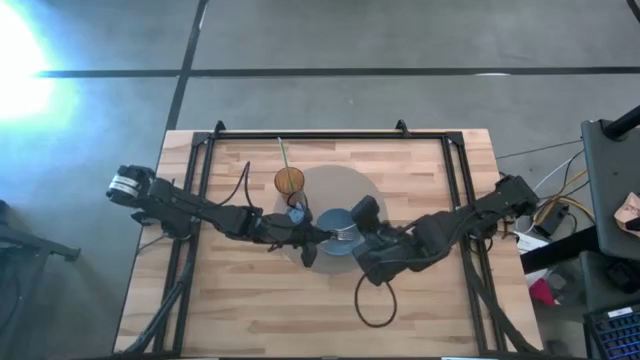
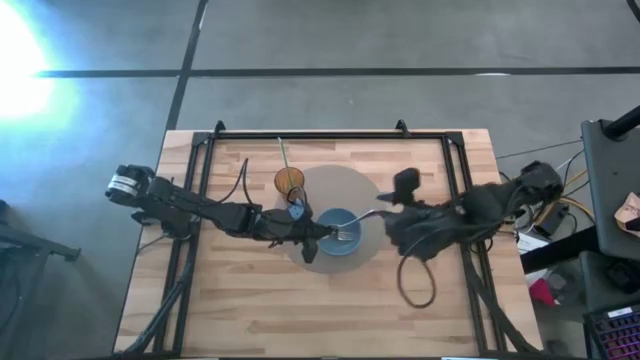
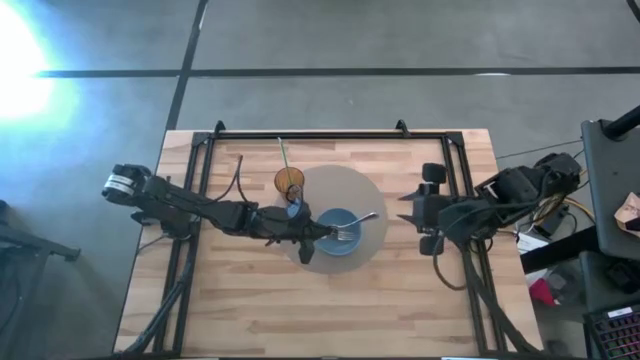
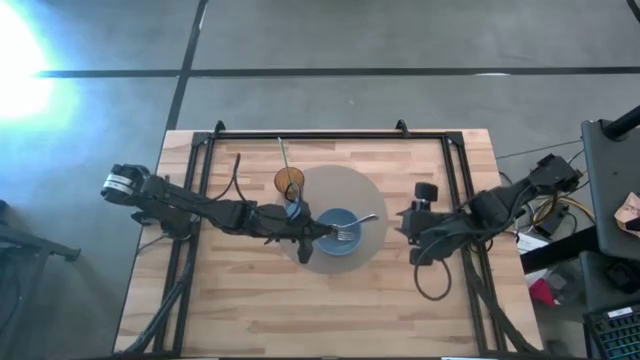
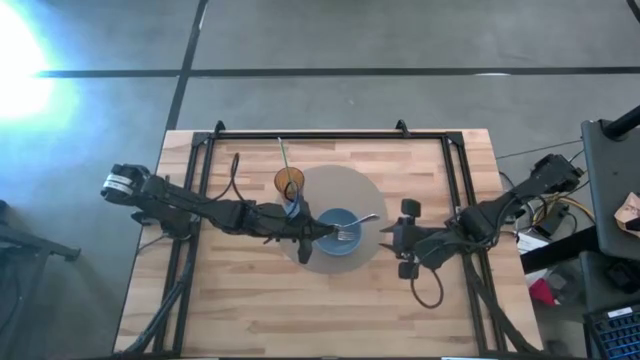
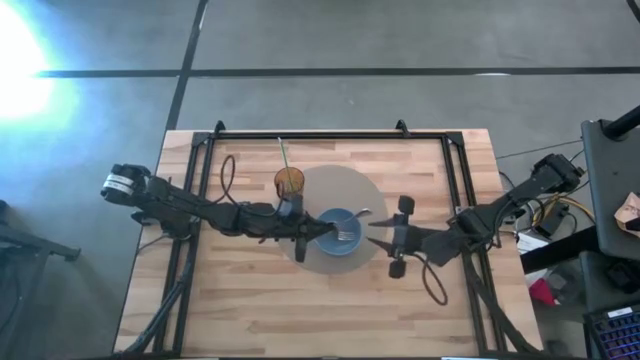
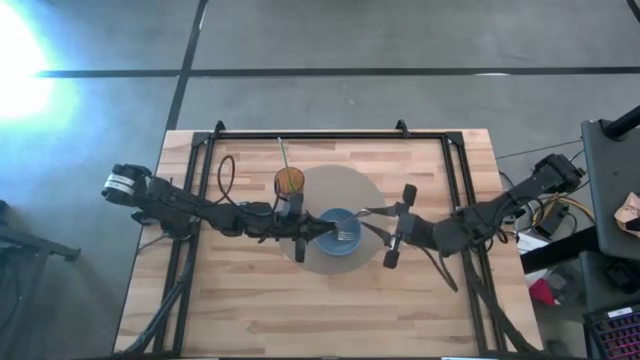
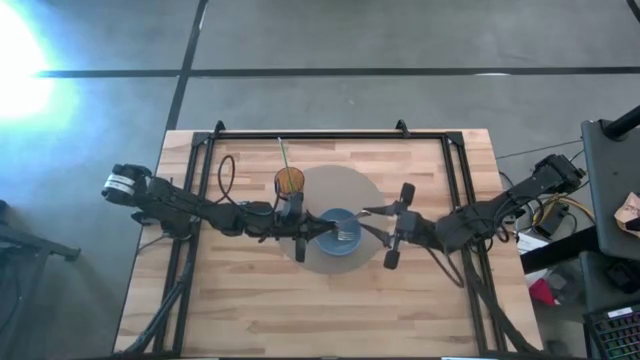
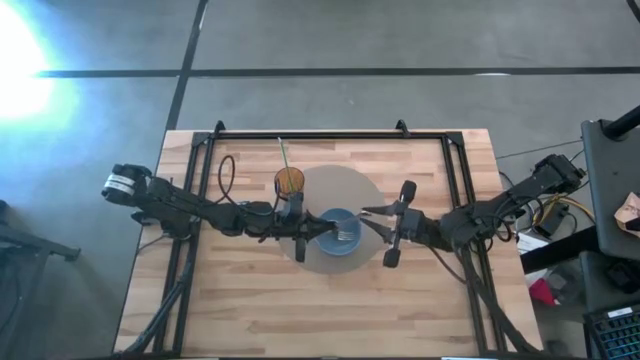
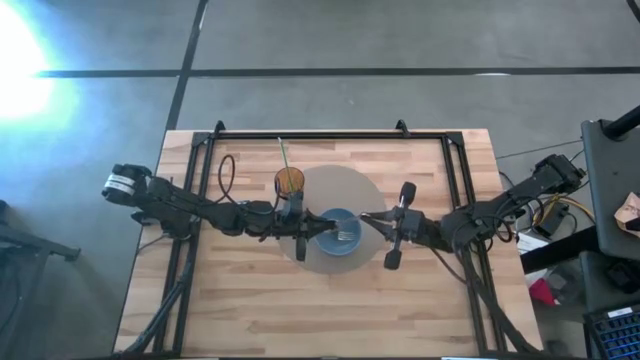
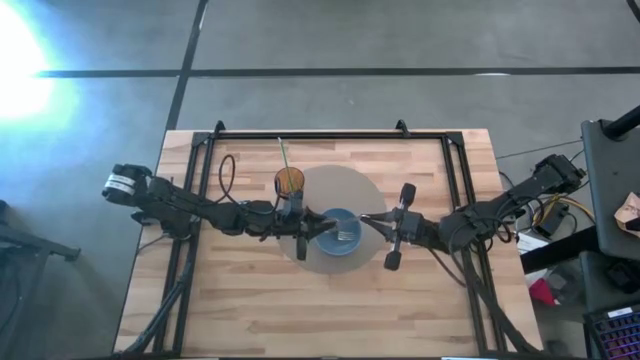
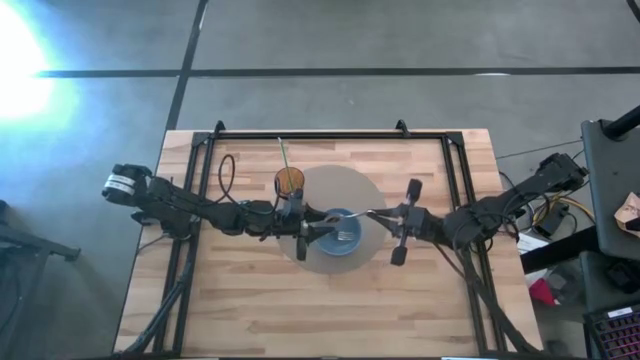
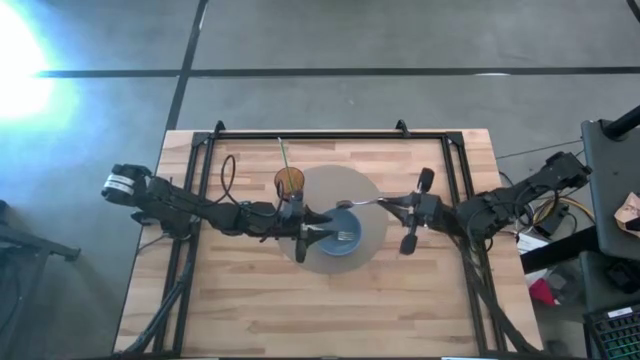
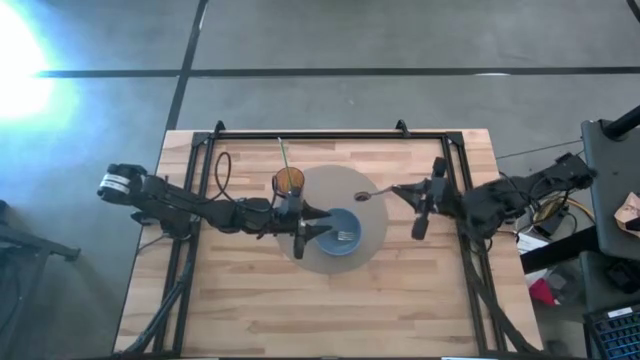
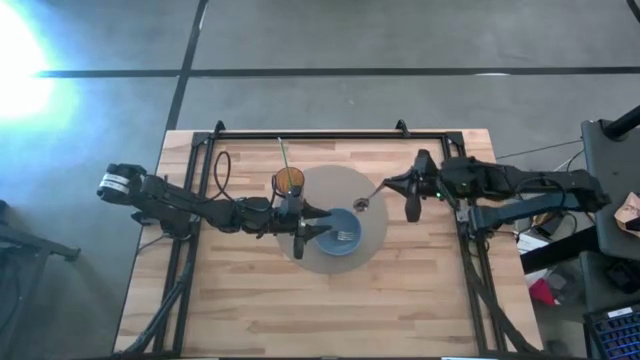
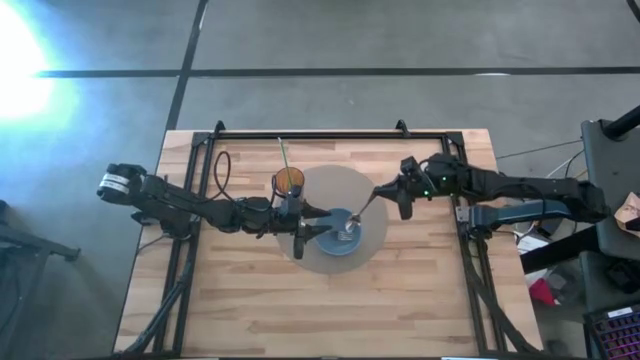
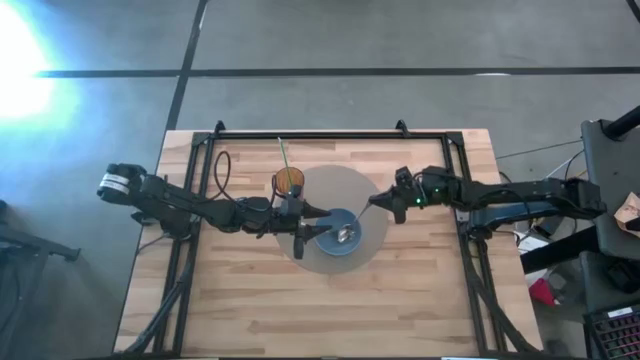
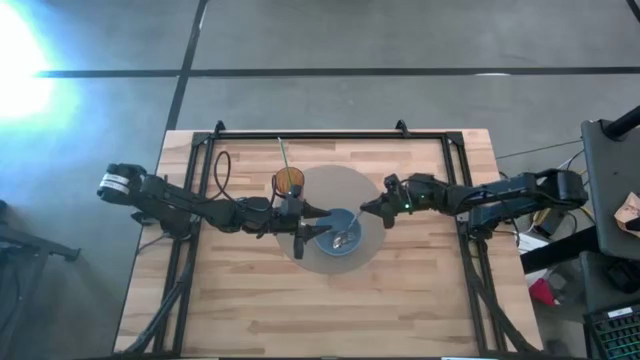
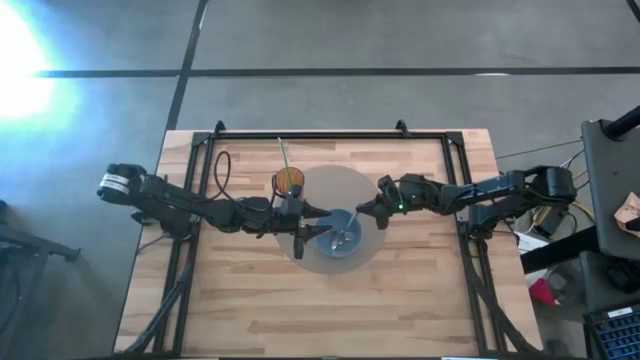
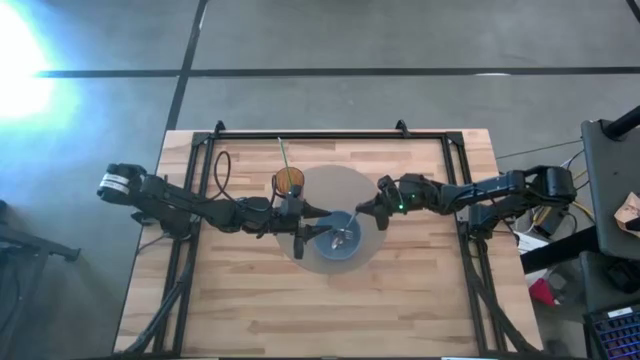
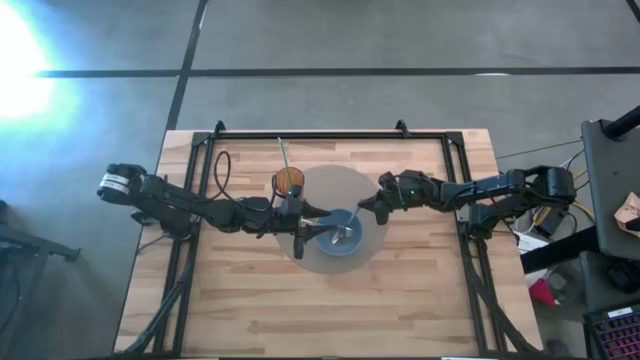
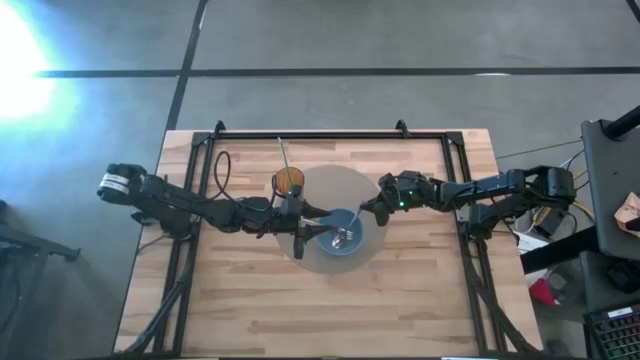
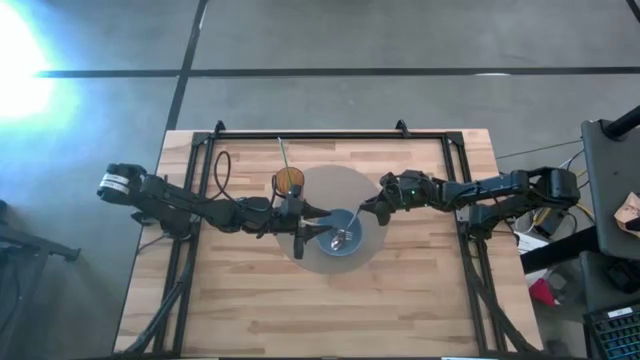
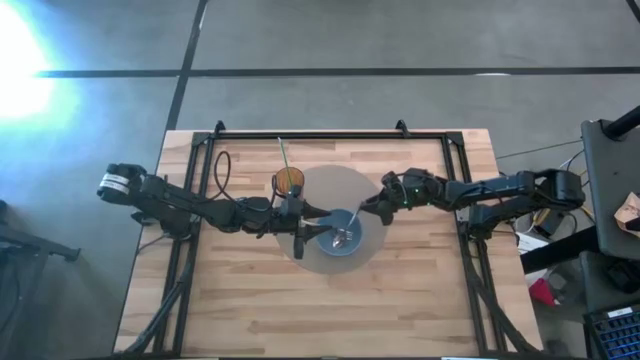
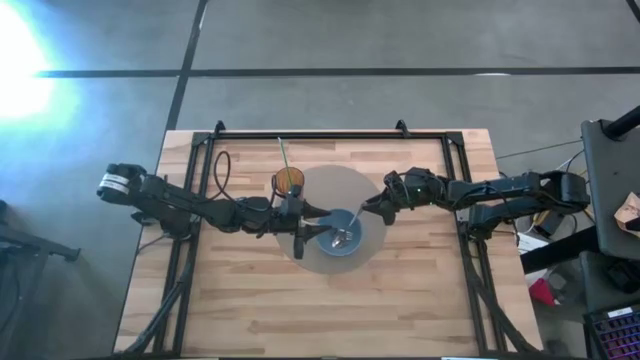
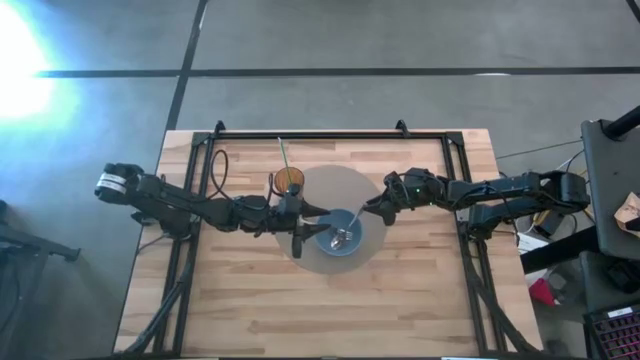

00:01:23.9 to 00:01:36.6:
Task: Pick & Place Utensil
Put the spoon into the bowl

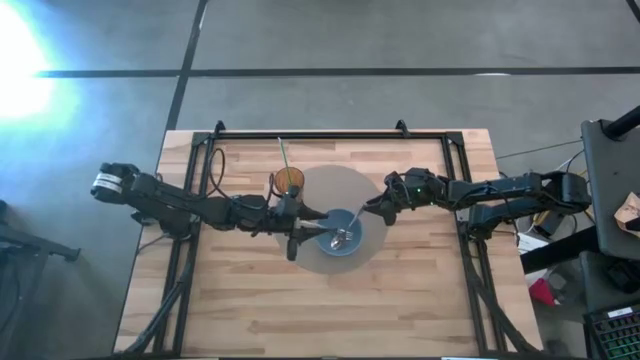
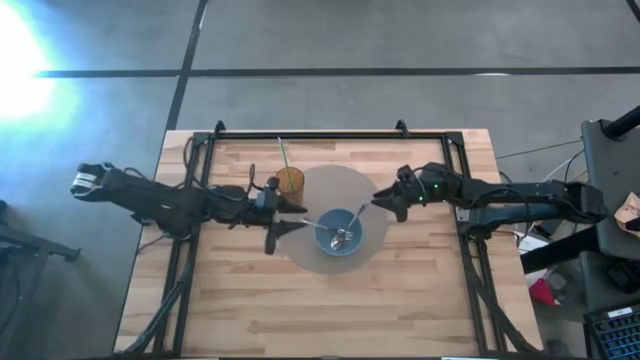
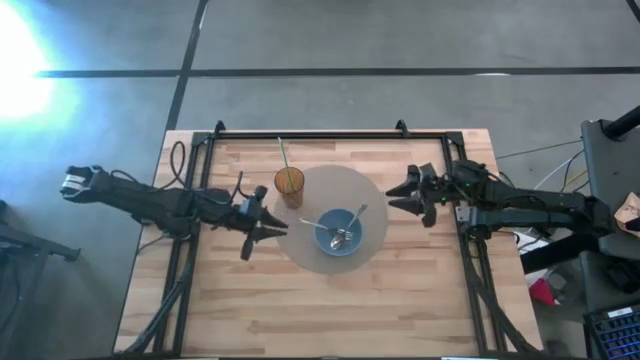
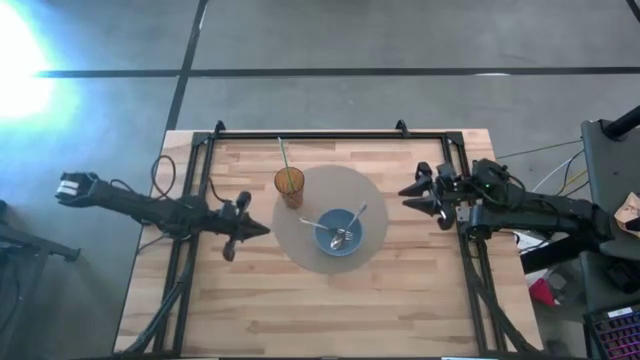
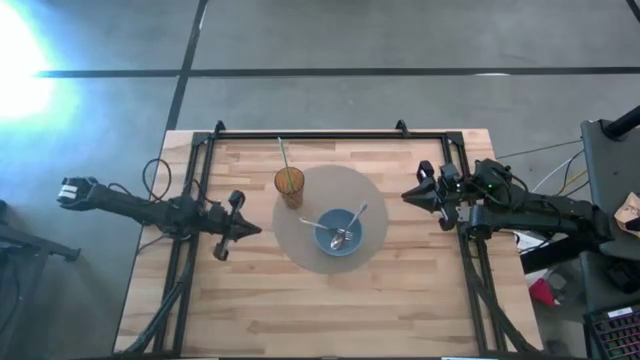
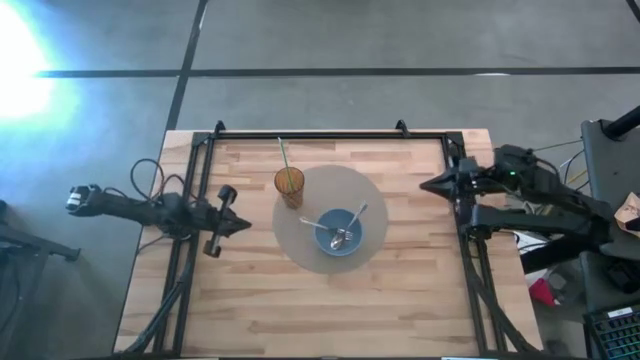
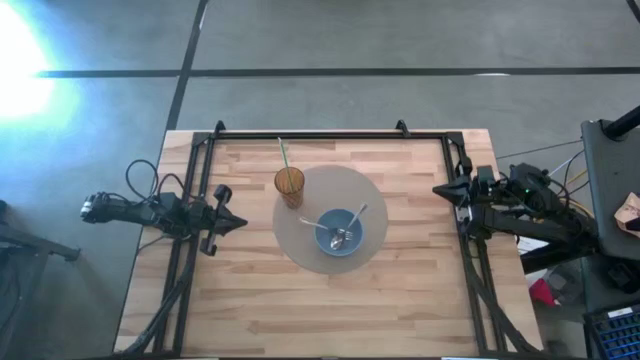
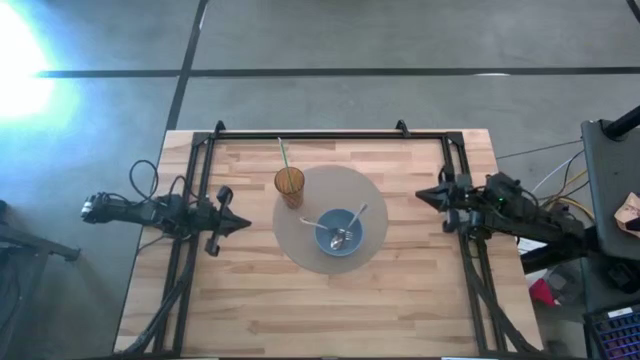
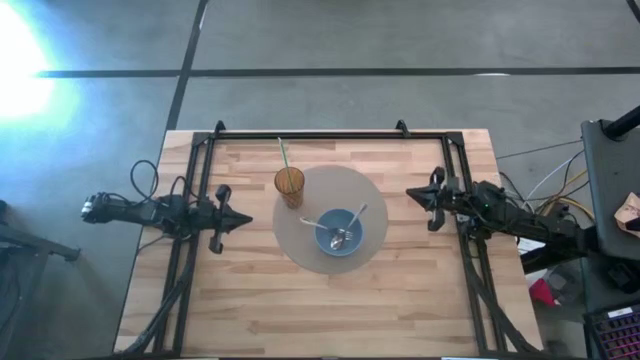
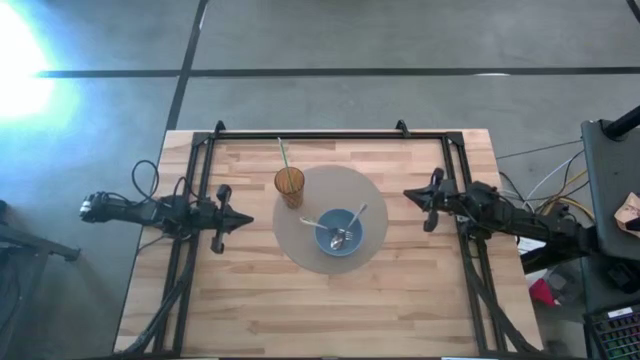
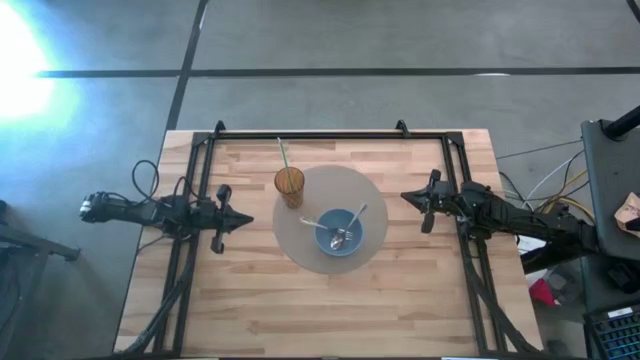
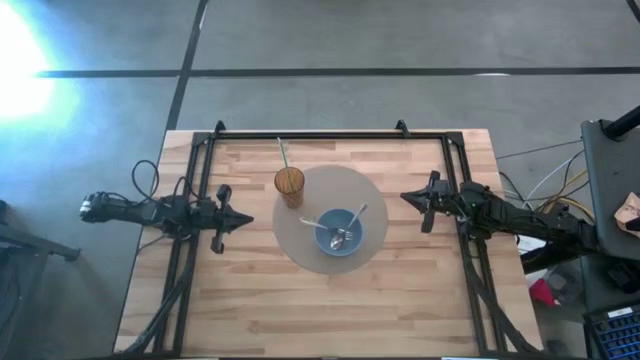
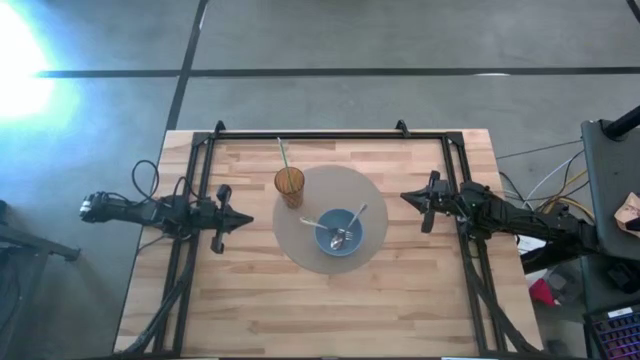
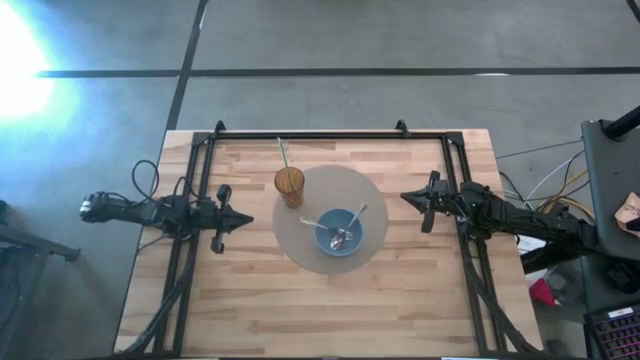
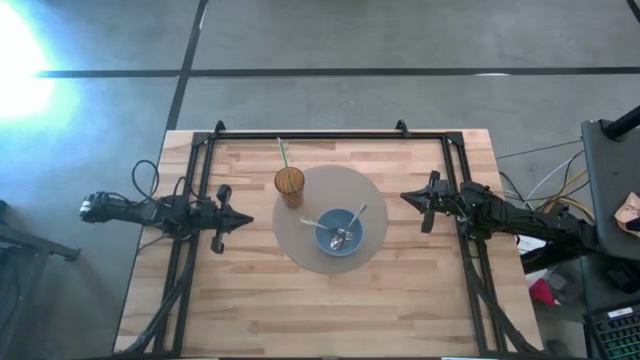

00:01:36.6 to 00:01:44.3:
Return to Home Position

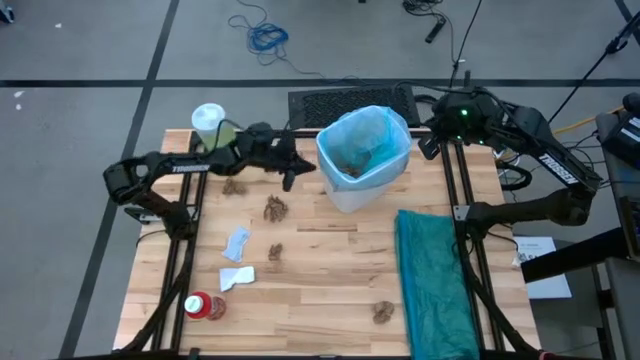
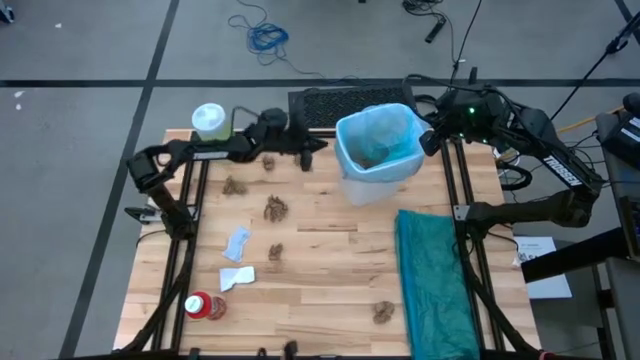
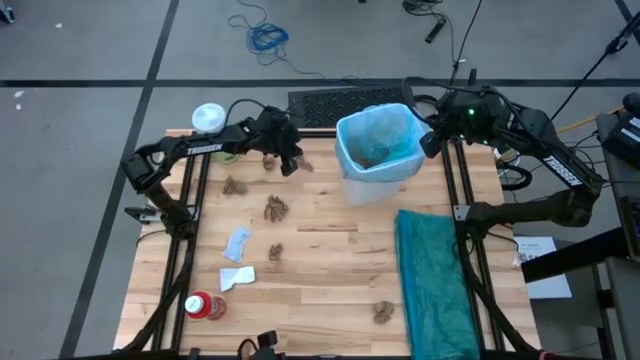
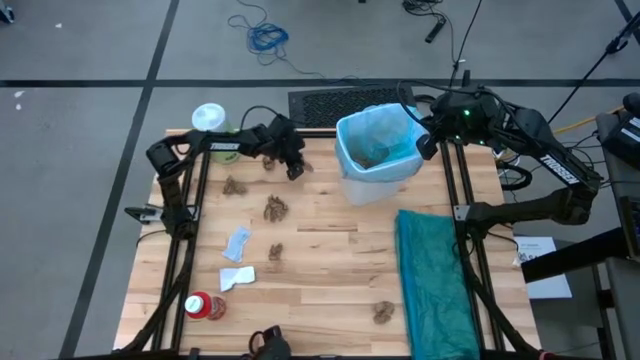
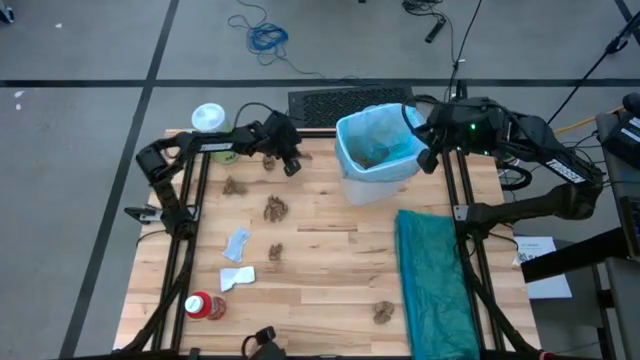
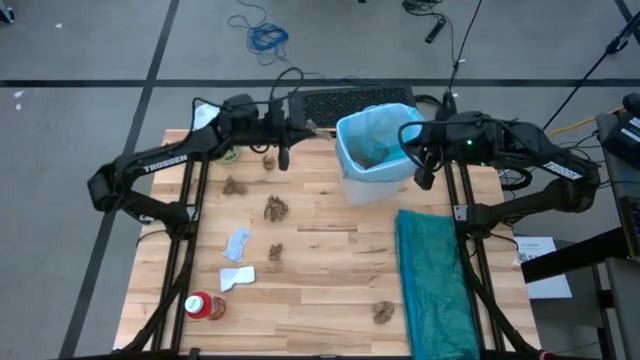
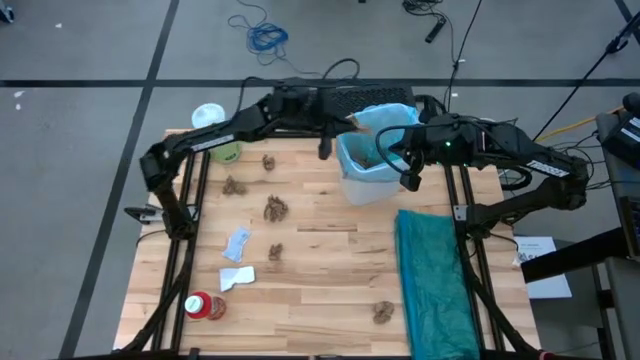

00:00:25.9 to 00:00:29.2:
Task: place trash/remove bag and relplace
Put the brown paper trash into the trash bin
